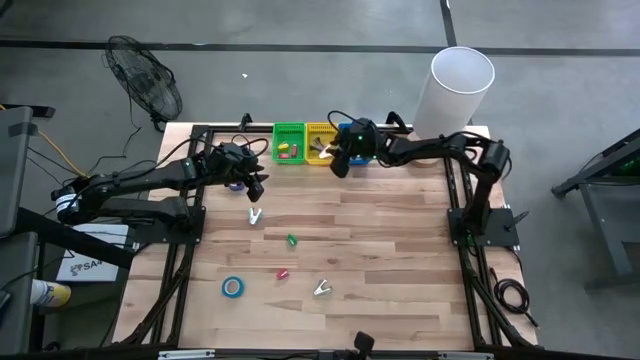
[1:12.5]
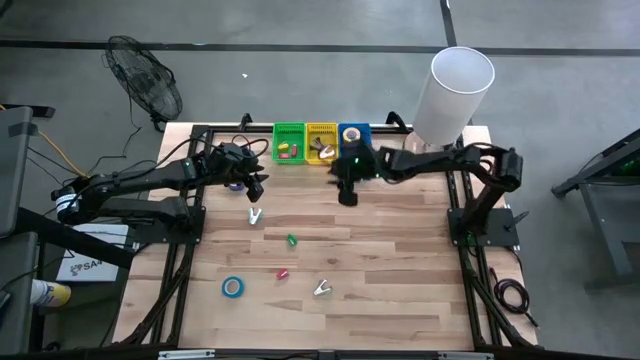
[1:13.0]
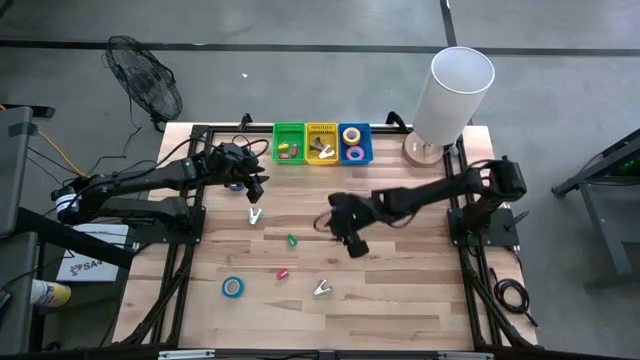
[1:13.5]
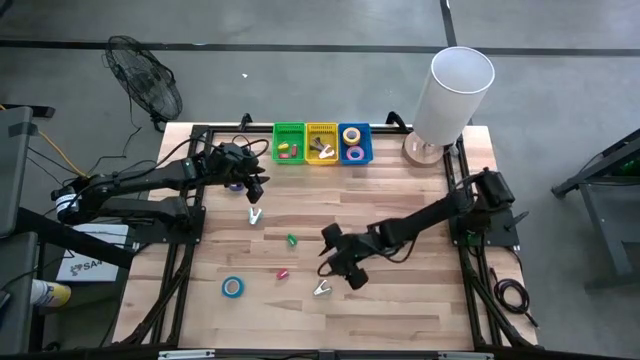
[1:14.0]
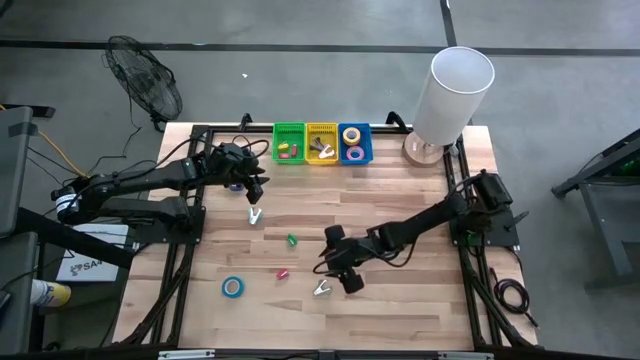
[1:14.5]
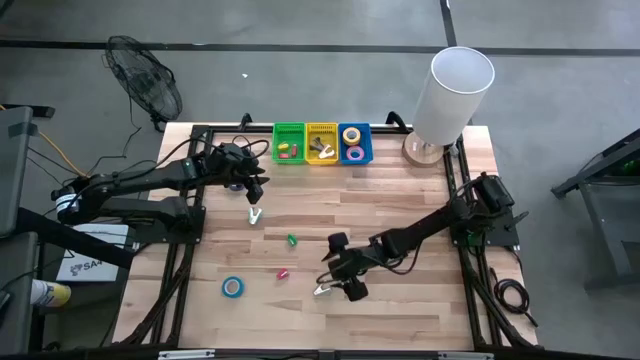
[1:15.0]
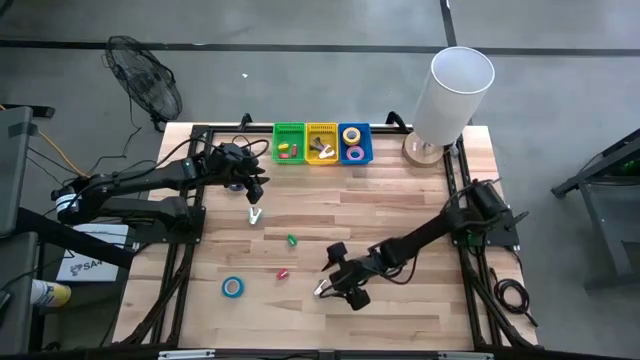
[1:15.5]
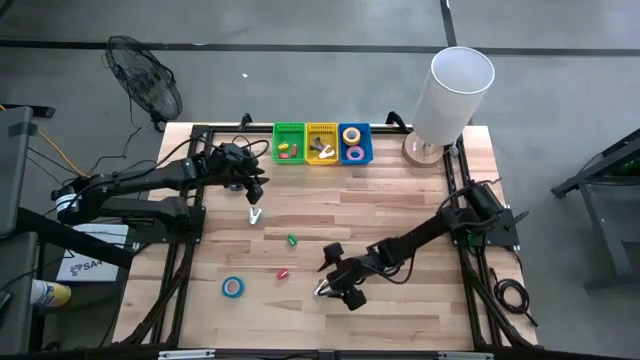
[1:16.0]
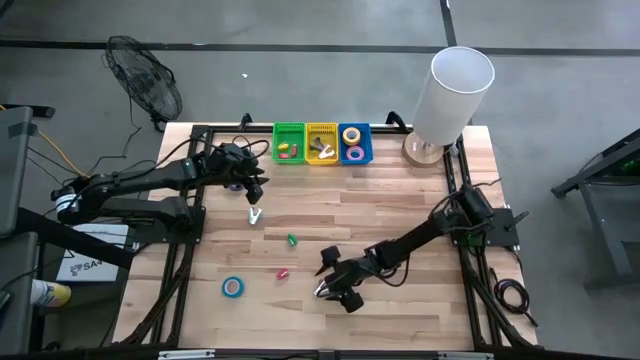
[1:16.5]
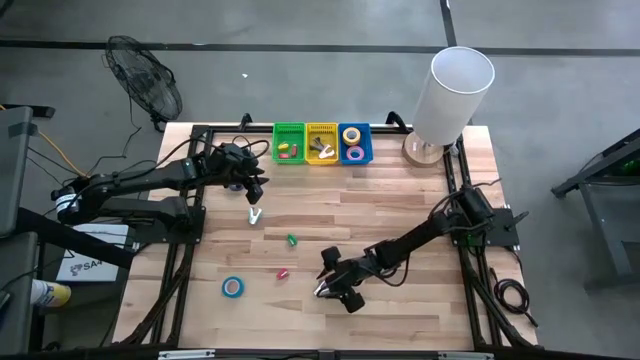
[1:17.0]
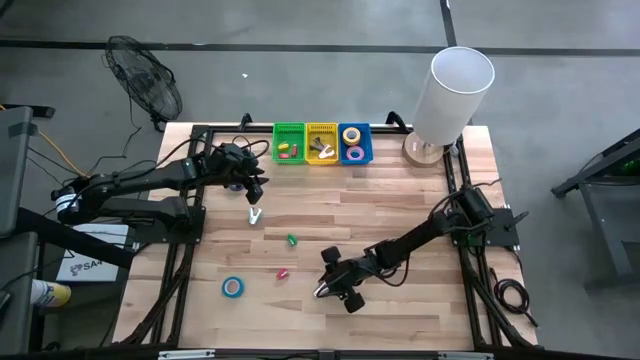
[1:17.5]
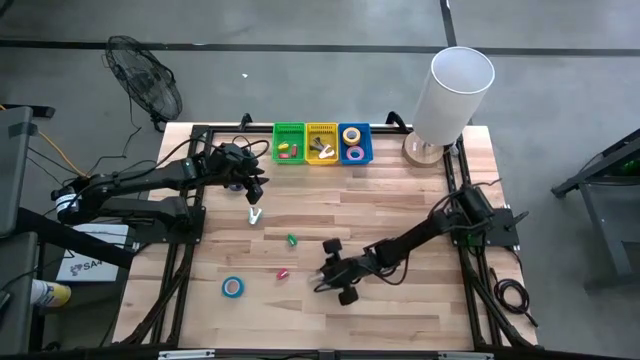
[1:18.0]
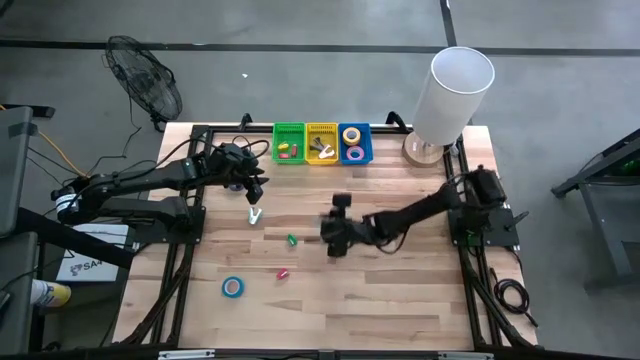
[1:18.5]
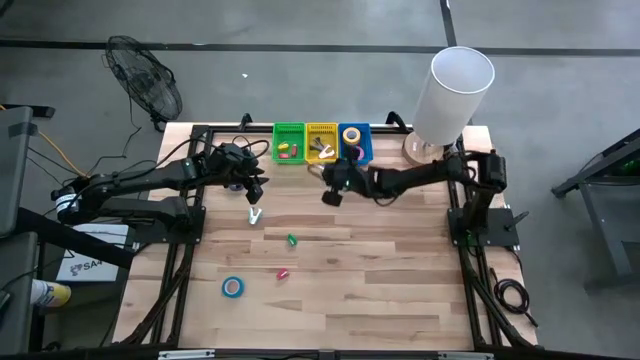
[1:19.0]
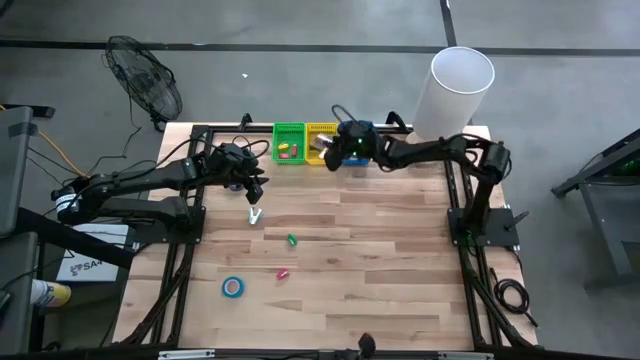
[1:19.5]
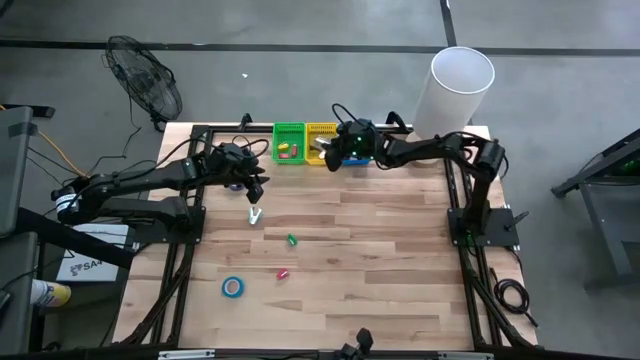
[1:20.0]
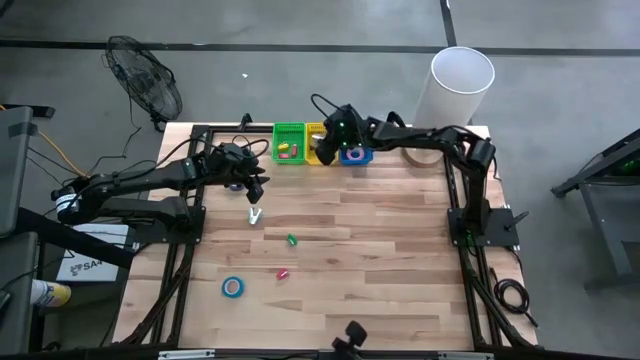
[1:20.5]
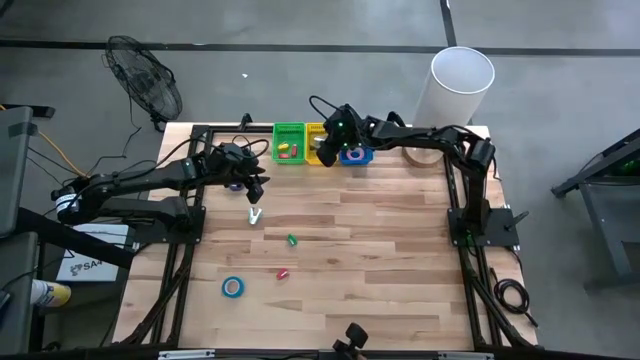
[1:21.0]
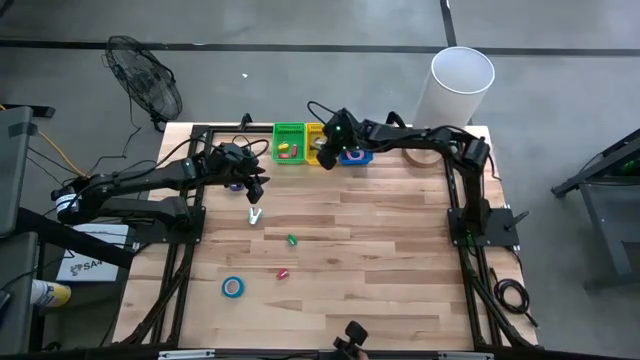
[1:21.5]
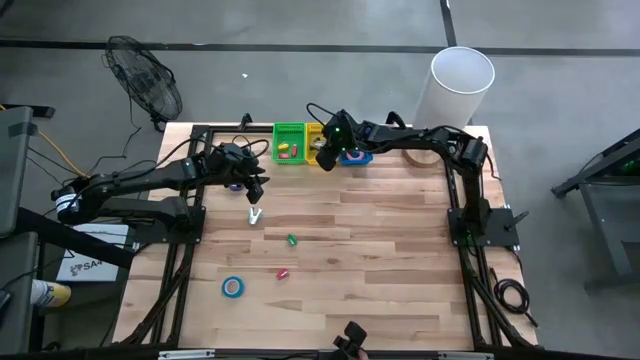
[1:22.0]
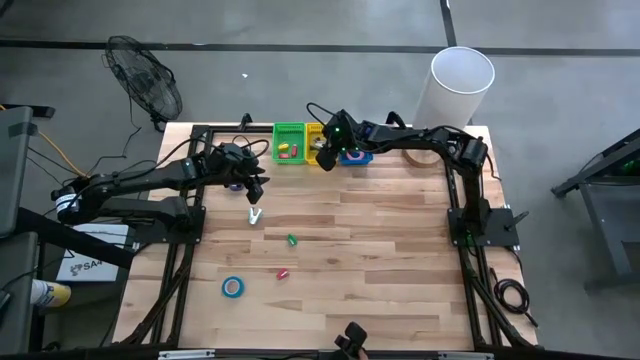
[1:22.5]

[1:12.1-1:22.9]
Task: Pick and place Stapler, Stapler remover, tape
Put the gray staple remover into the yellow bin

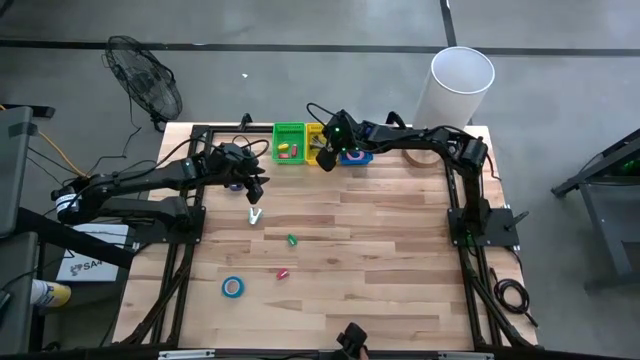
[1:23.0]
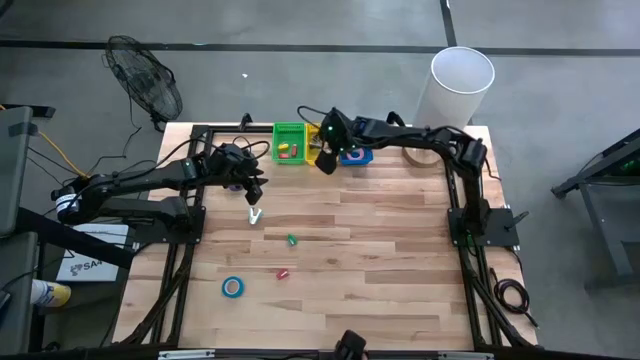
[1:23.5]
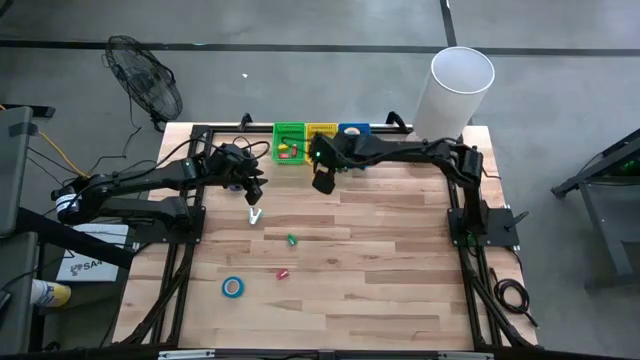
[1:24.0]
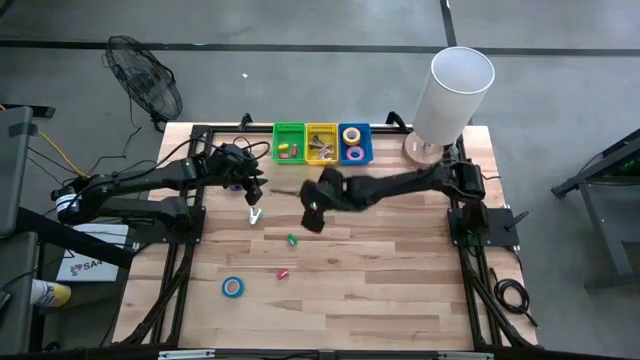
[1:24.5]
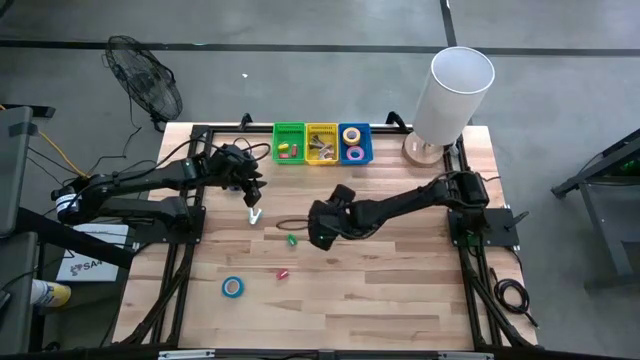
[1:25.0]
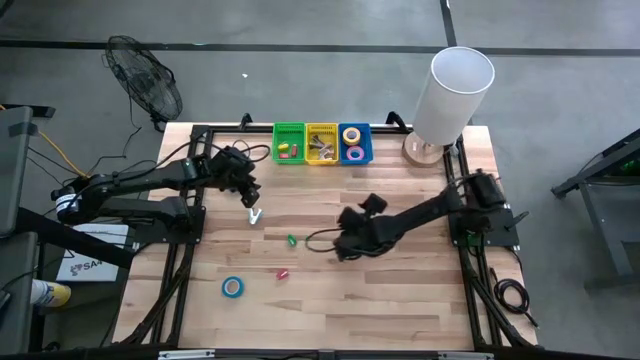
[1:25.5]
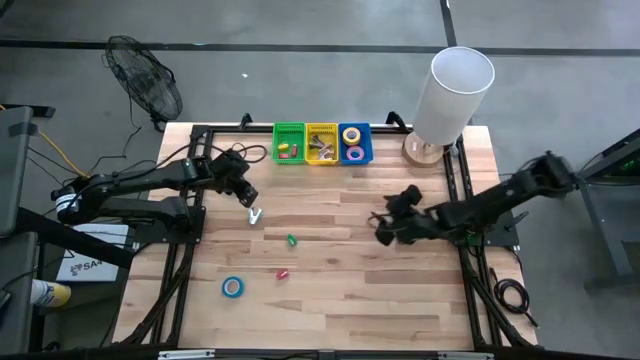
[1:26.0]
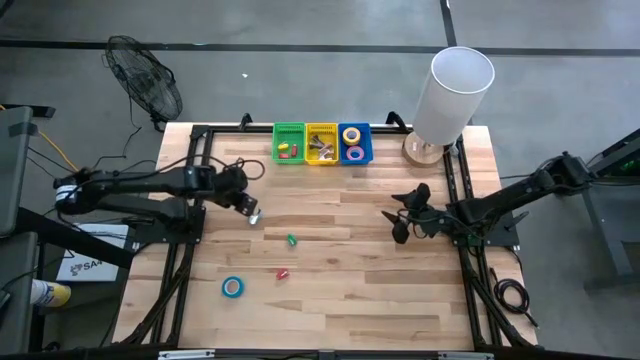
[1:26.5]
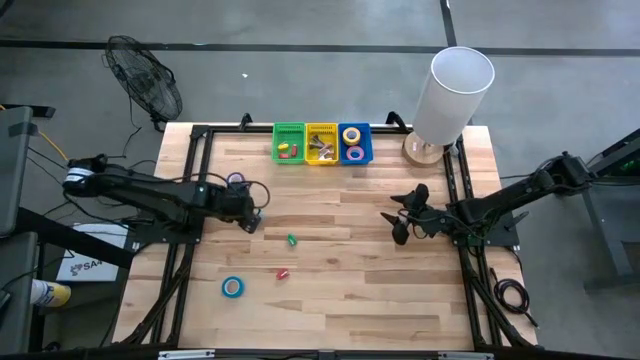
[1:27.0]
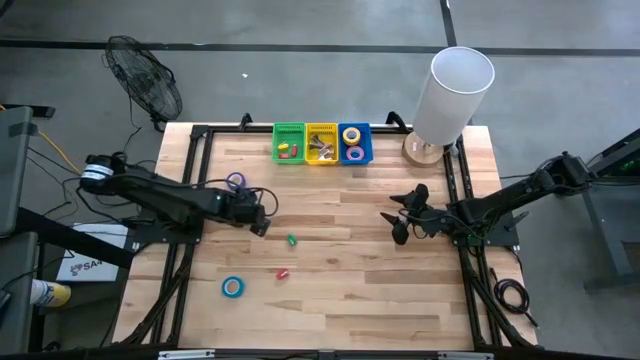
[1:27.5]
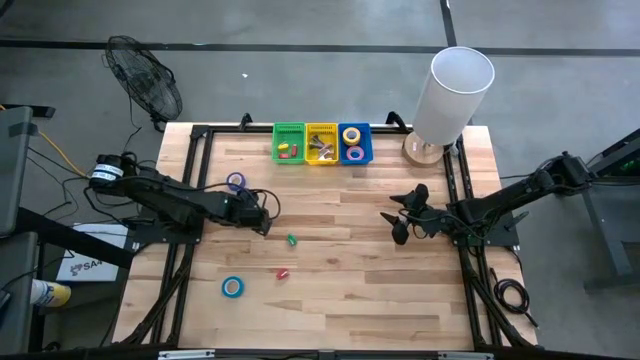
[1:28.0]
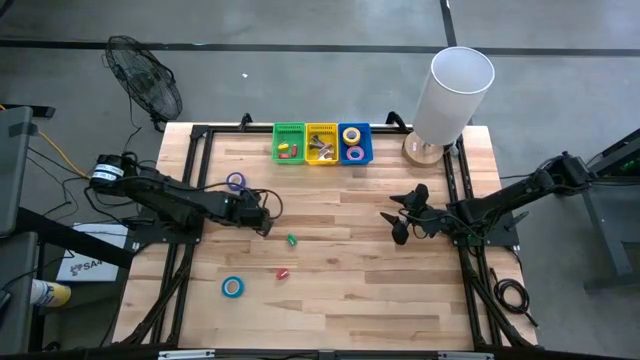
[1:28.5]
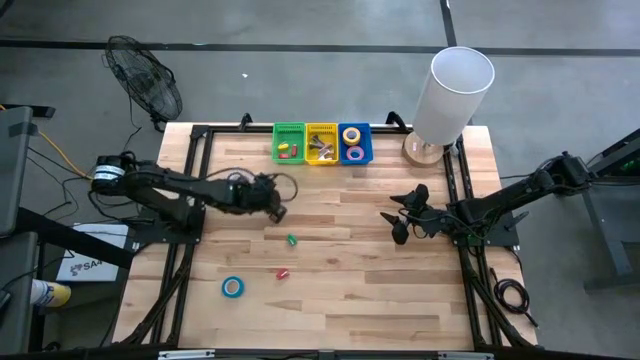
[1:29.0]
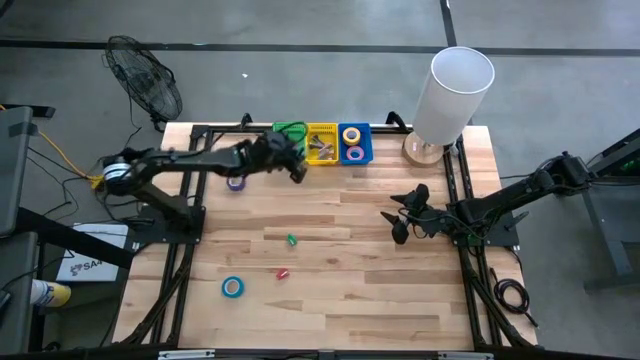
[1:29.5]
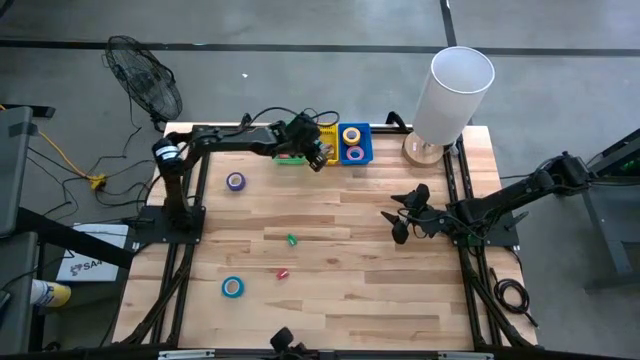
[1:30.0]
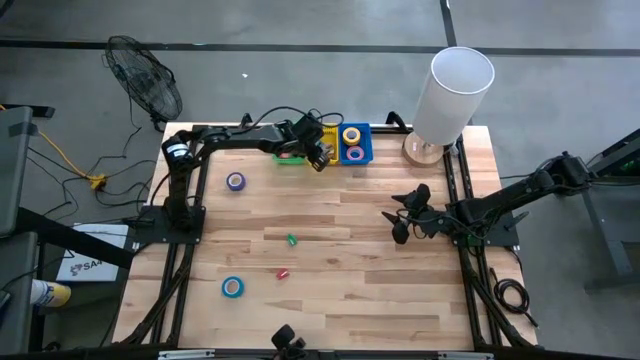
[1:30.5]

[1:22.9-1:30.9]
Put the blue staple remover into the yellow bin

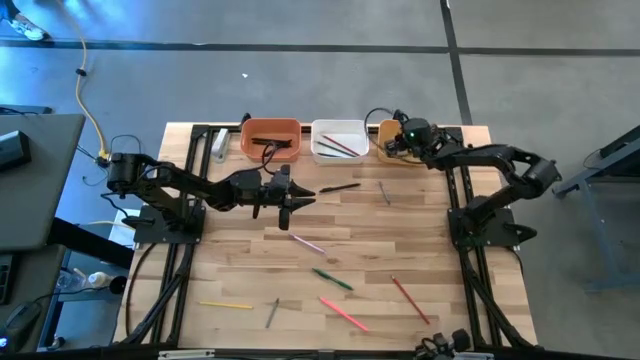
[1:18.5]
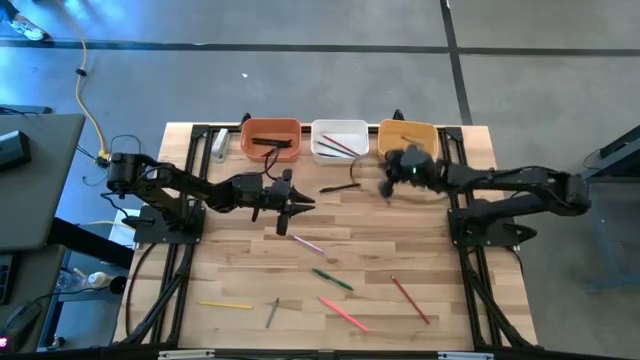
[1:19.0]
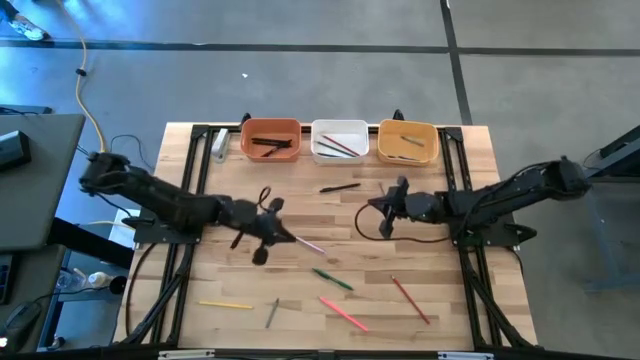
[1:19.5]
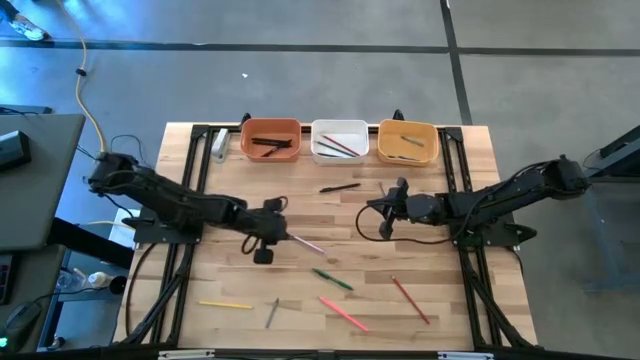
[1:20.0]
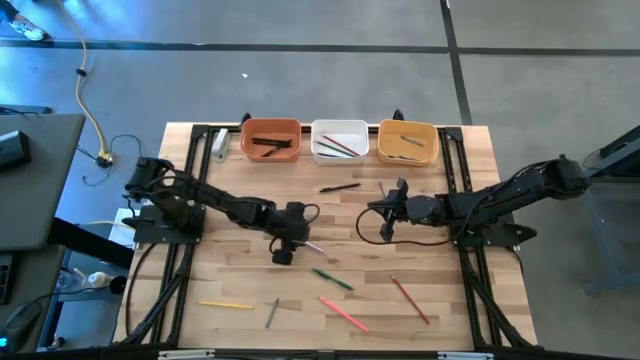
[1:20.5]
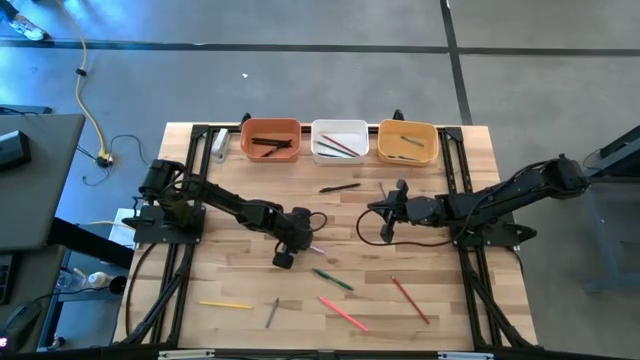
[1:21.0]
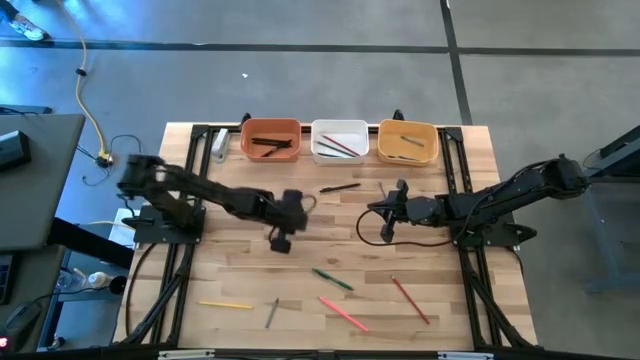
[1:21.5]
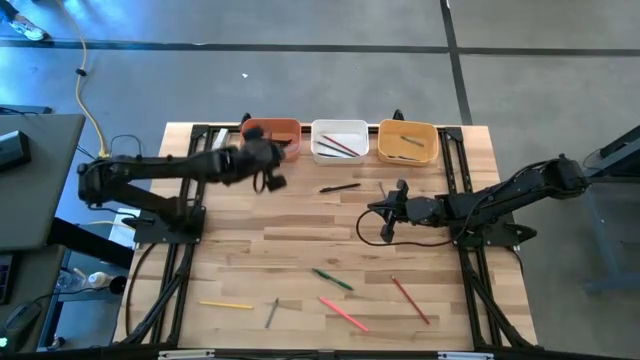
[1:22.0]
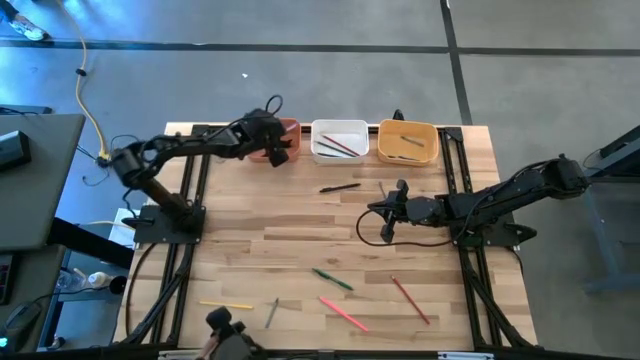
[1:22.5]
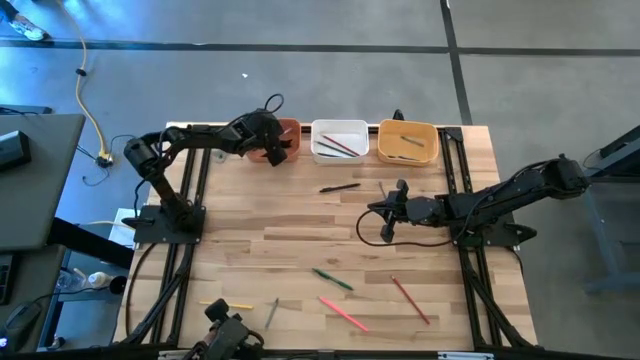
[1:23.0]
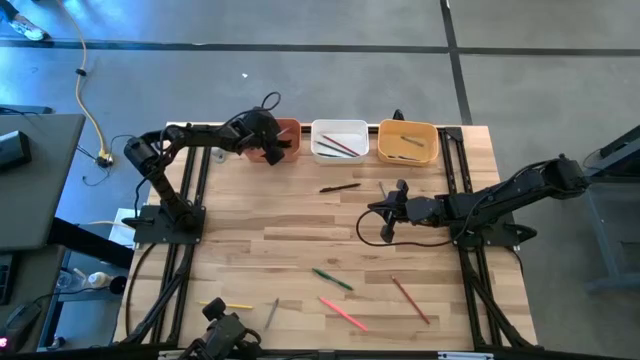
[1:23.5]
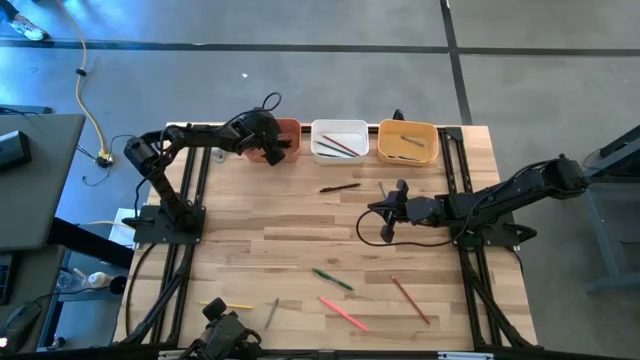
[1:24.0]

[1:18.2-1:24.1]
Task: Sort crayons/erasers/pens/pencils in bins
Put the pink transparent pen into the orange bin
